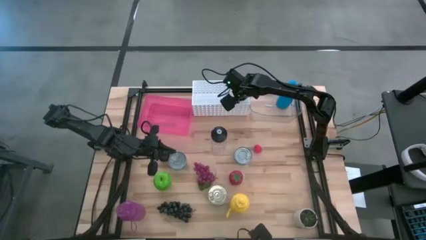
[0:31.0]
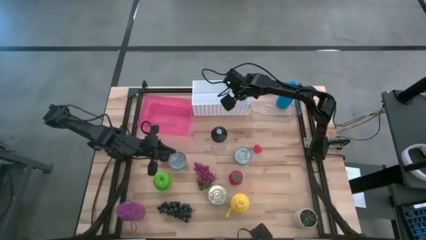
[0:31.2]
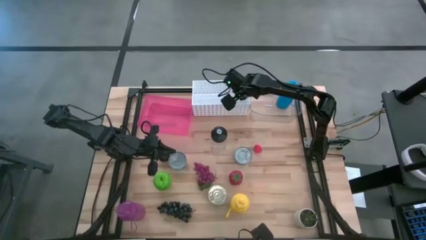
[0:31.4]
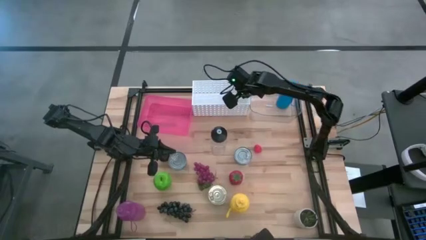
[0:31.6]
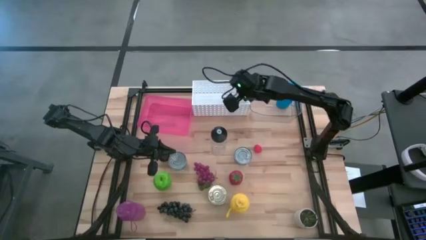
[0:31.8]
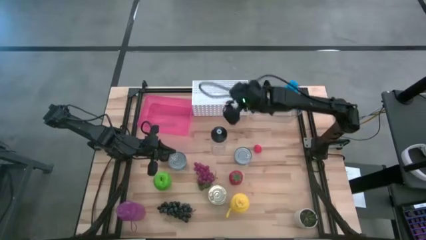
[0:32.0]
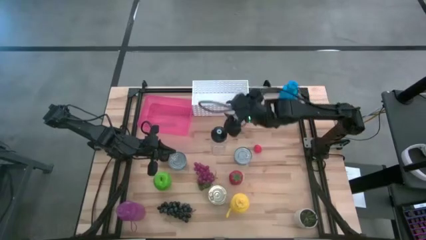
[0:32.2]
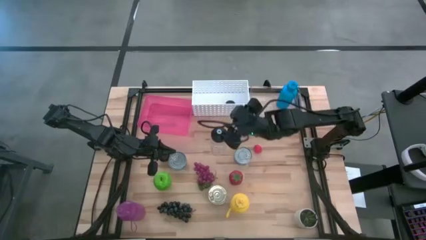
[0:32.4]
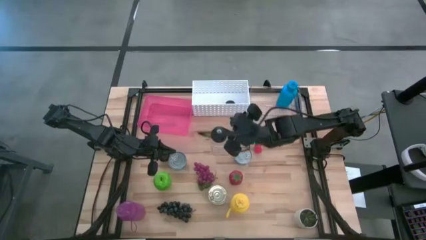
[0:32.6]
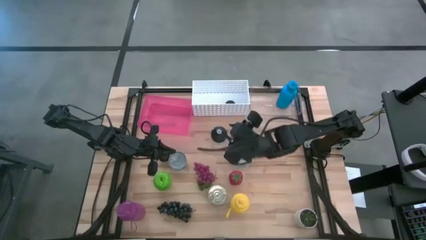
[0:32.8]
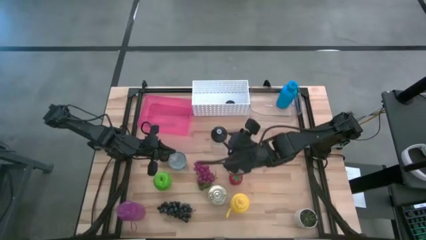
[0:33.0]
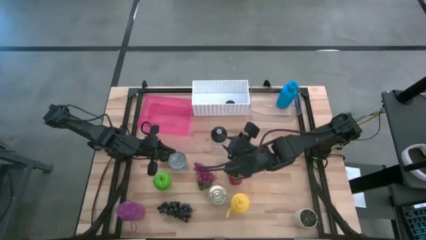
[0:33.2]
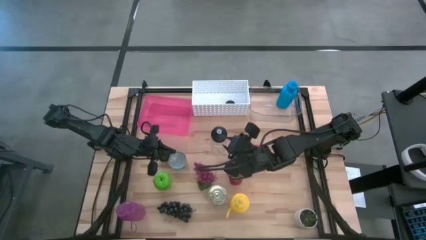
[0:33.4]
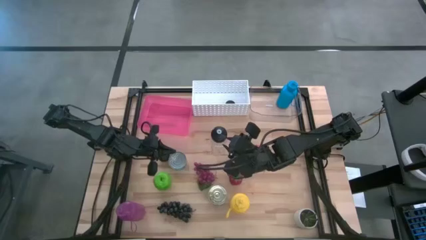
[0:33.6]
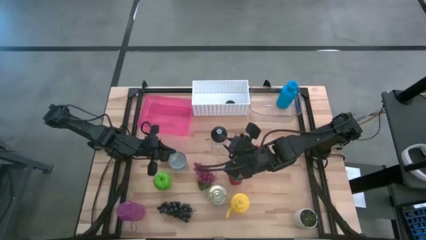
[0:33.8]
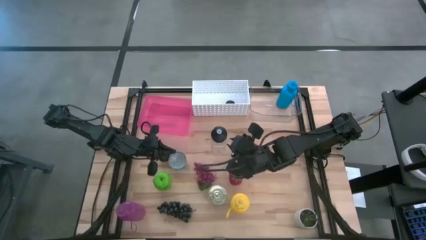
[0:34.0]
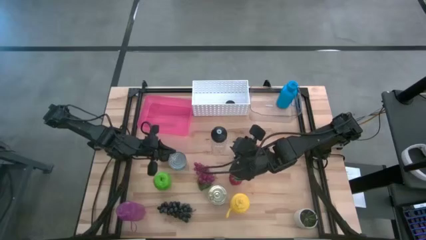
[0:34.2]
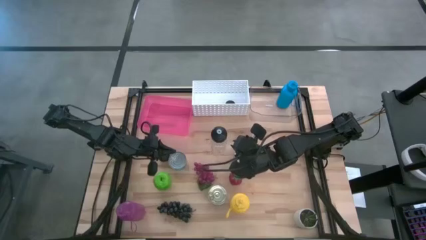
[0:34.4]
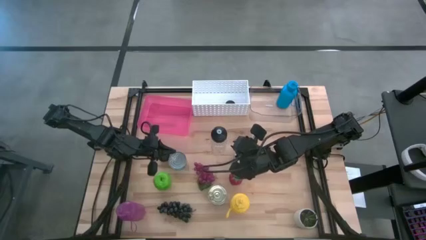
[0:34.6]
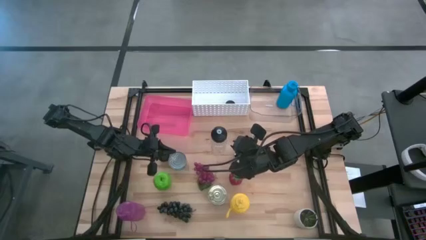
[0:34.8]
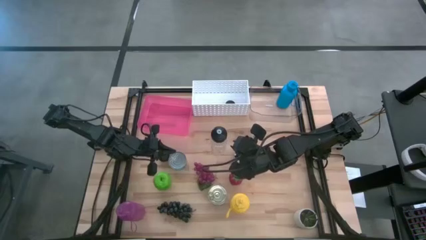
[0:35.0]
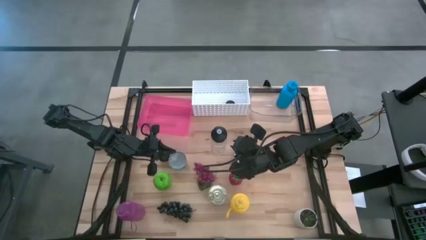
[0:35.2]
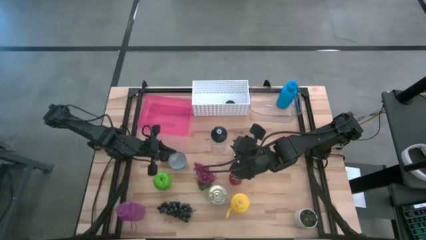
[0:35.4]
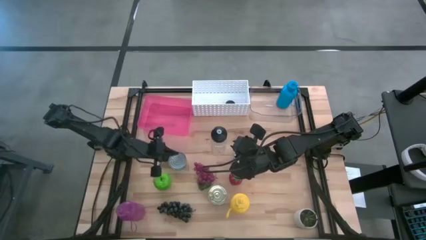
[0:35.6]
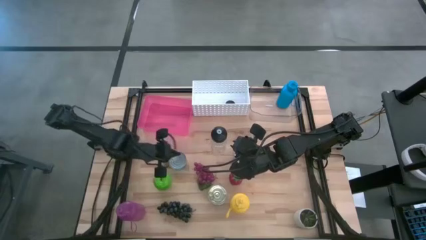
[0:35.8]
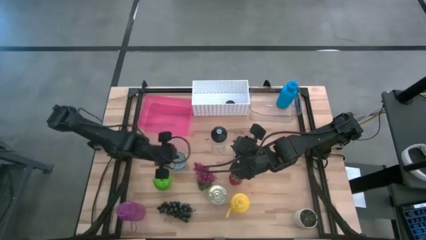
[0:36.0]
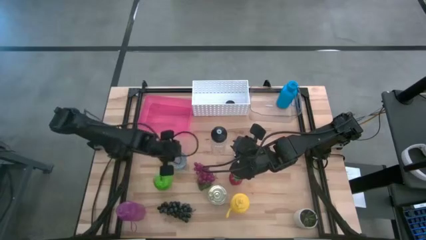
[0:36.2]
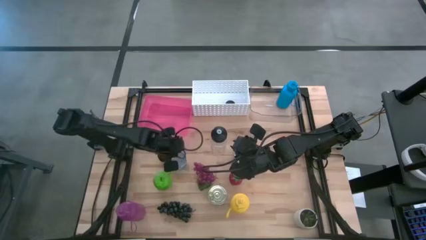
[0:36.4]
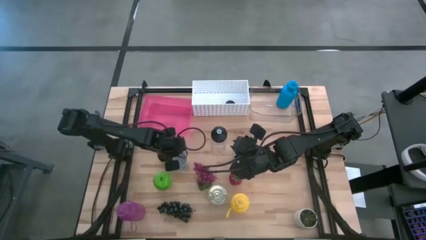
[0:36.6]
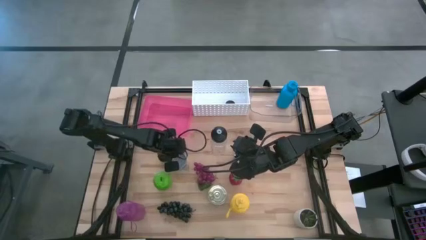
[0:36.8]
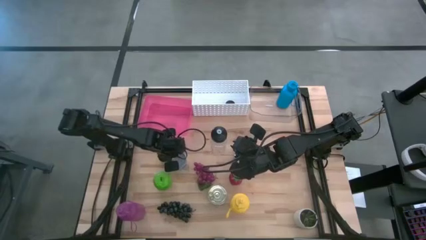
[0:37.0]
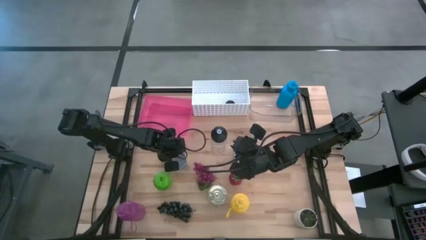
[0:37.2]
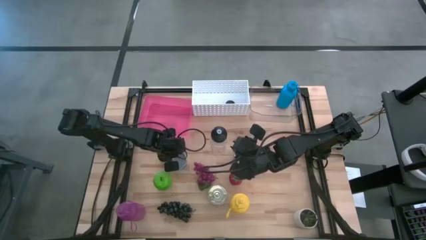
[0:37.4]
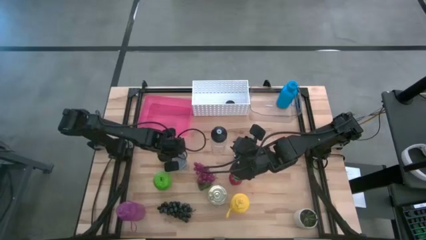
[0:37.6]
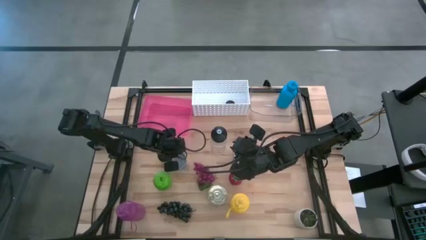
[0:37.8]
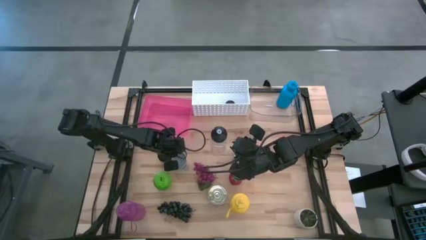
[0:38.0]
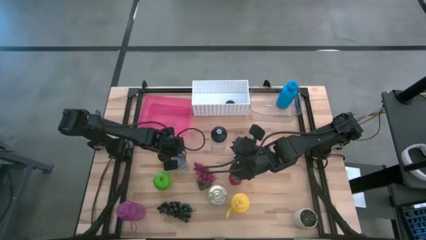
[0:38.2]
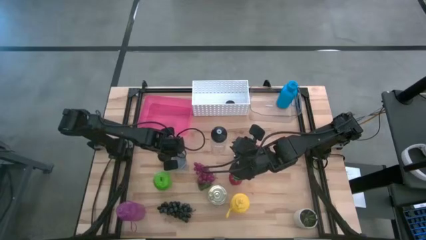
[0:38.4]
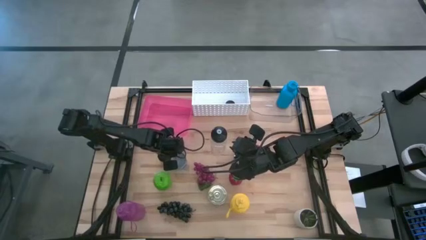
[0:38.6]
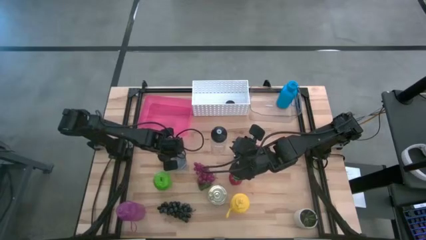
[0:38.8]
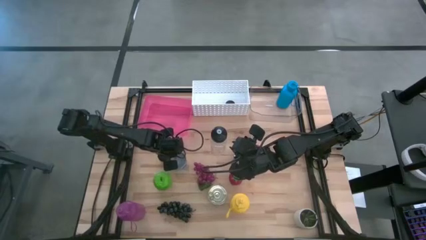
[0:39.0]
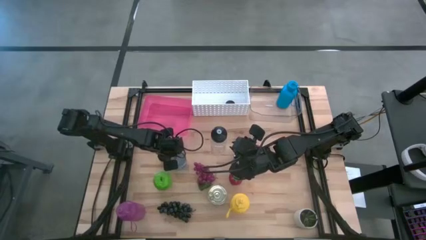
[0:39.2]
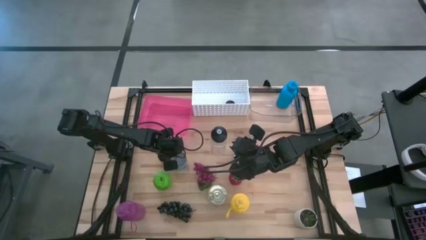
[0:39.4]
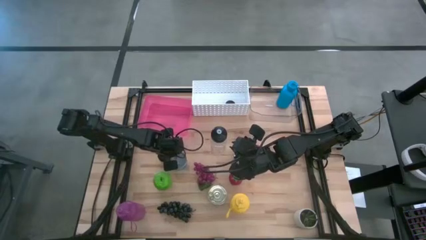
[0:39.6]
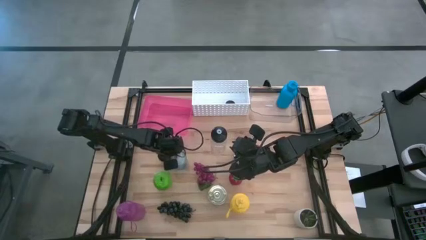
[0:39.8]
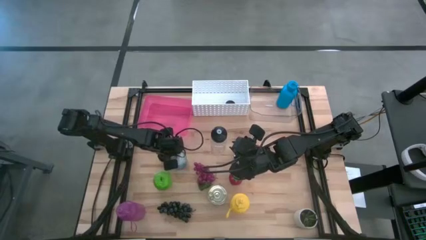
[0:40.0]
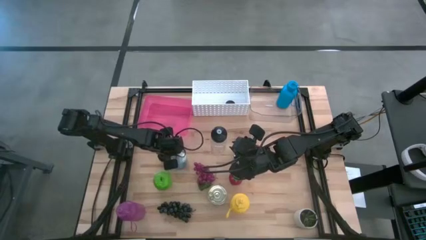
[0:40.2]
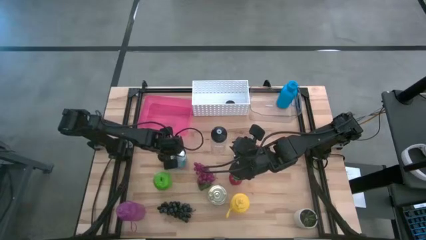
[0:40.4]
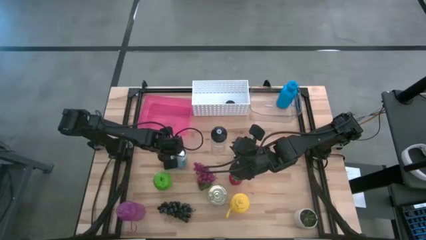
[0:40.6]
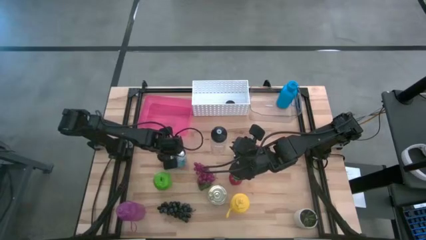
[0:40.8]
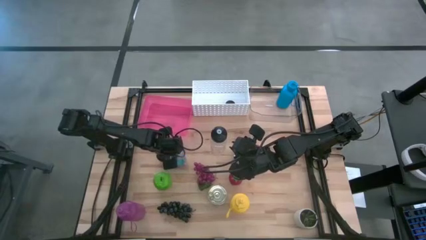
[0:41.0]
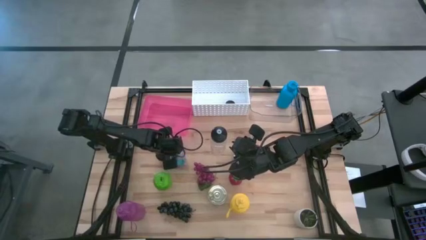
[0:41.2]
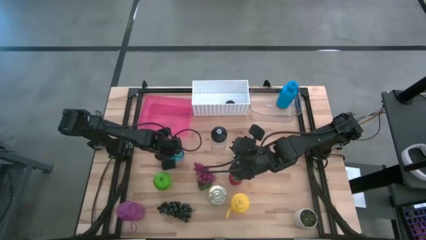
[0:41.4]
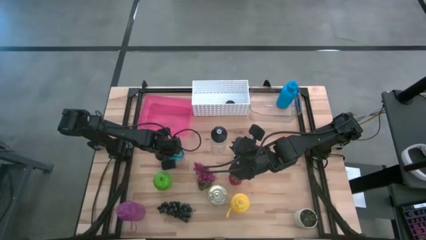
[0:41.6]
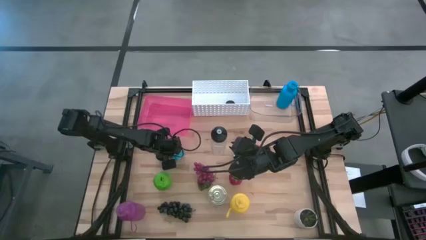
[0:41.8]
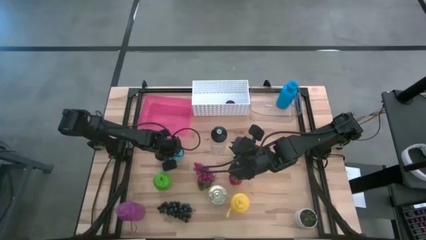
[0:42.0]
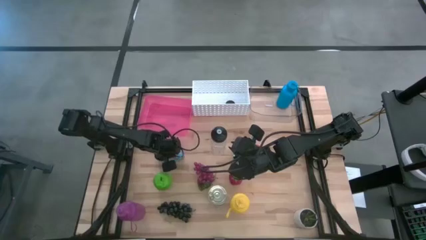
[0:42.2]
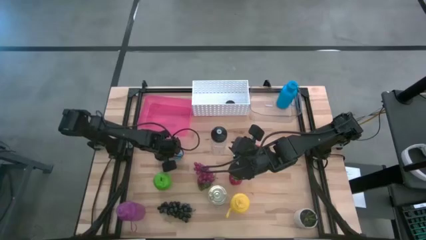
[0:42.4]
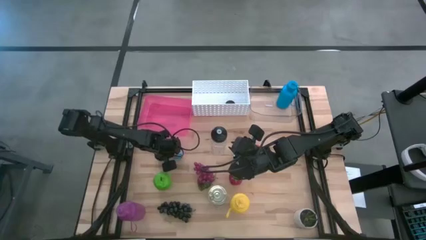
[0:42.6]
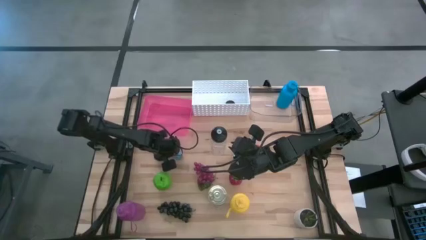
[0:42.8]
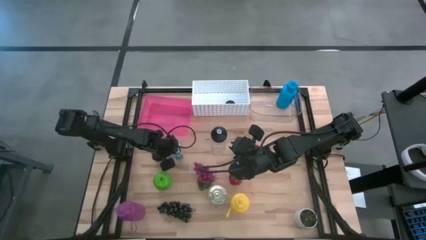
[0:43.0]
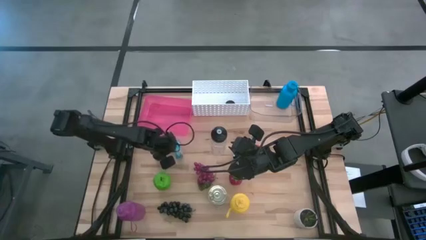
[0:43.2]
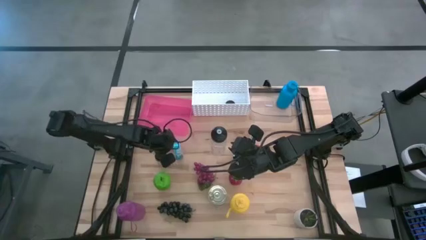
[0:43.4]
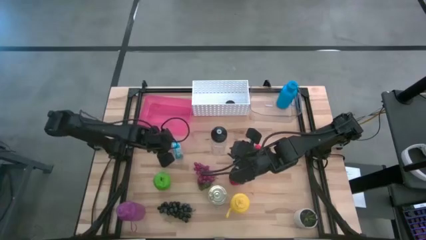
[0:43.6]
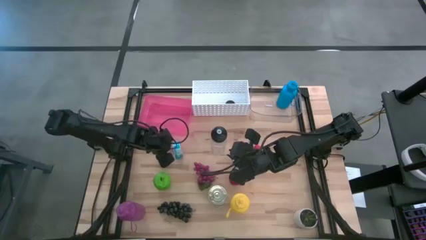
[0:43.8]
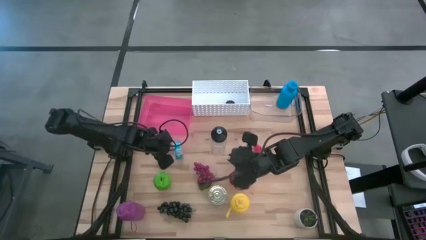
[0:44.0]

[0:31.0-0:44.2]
Task: Pick & Place Food Item
Put the yellow tuna can into the pink bin
